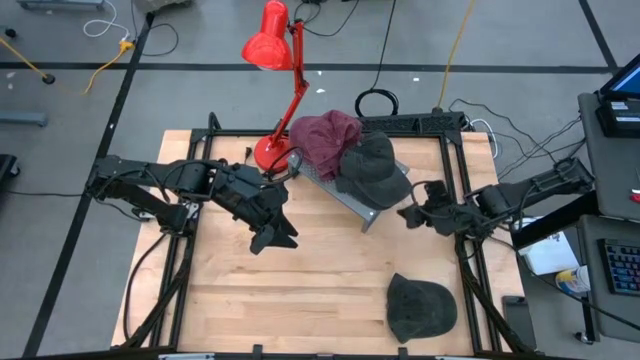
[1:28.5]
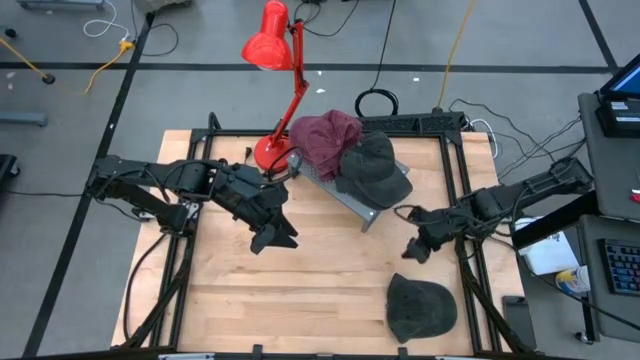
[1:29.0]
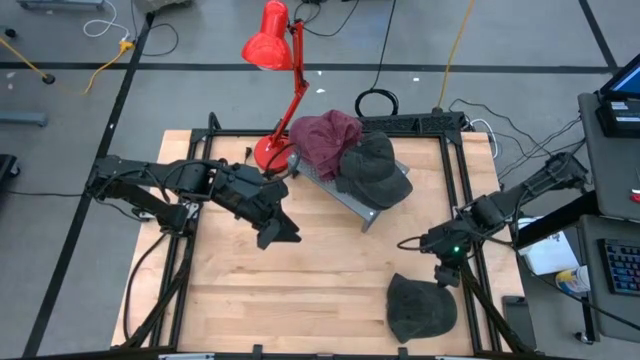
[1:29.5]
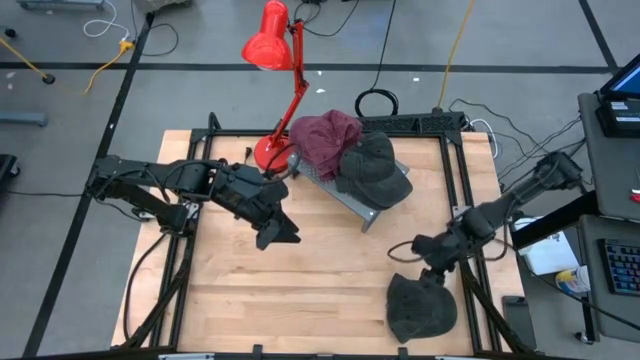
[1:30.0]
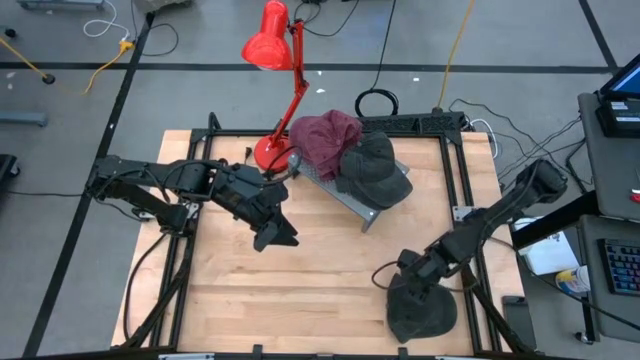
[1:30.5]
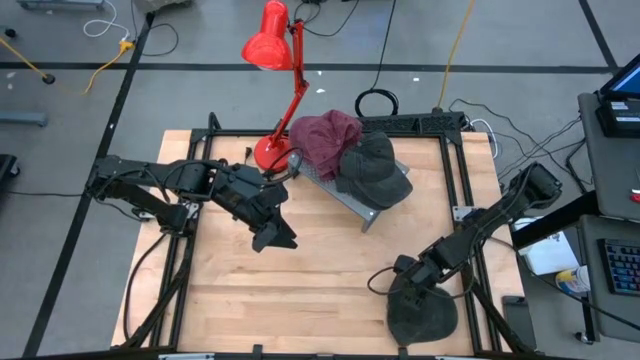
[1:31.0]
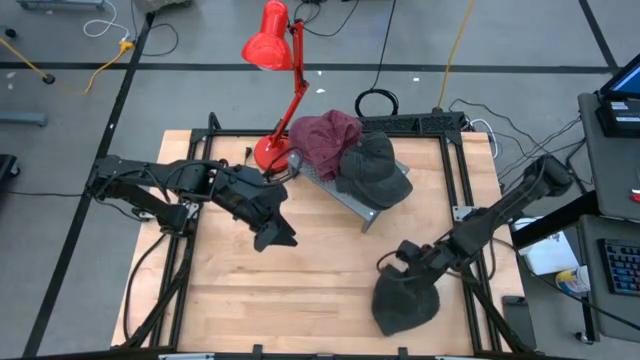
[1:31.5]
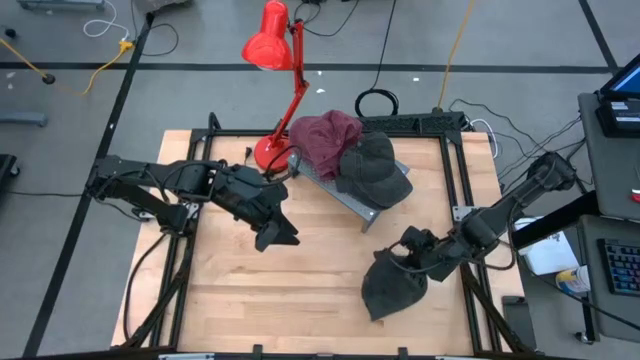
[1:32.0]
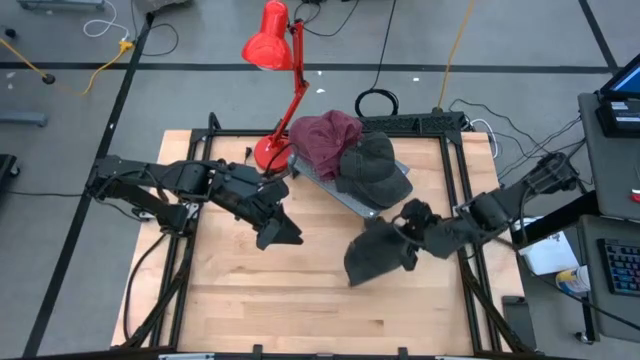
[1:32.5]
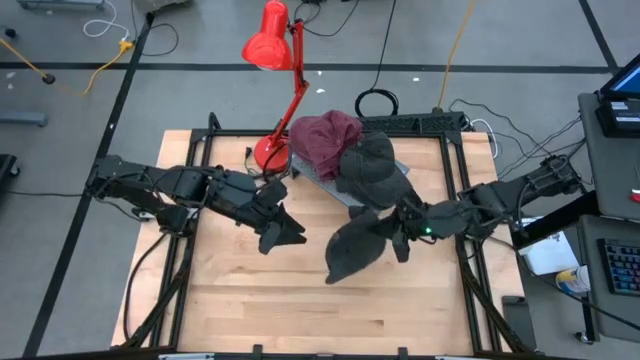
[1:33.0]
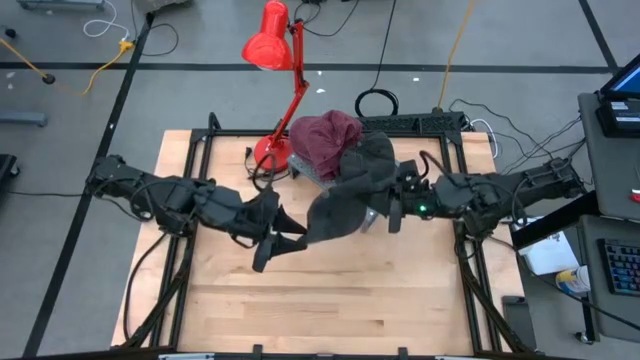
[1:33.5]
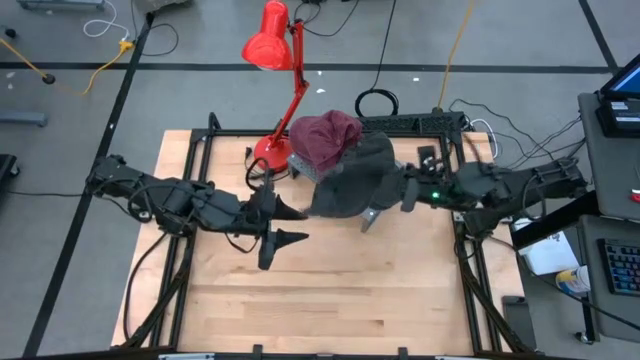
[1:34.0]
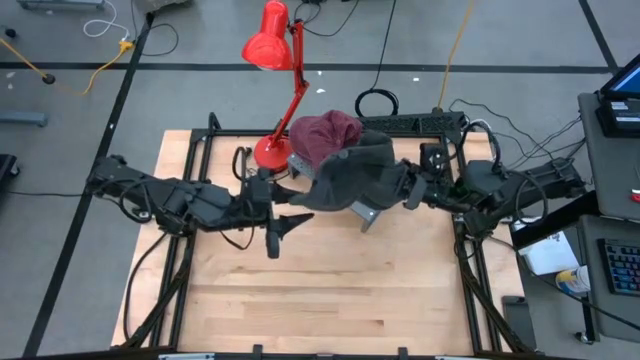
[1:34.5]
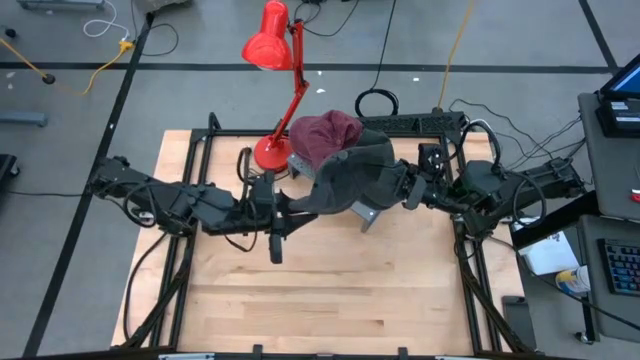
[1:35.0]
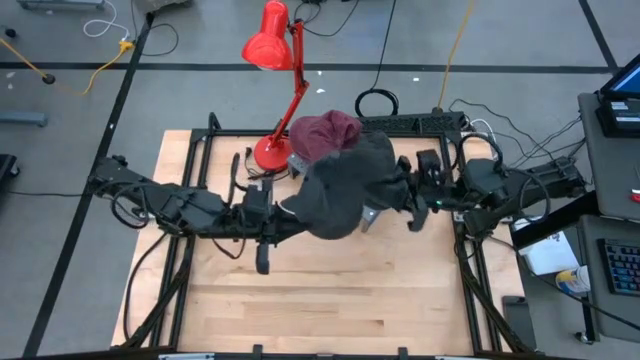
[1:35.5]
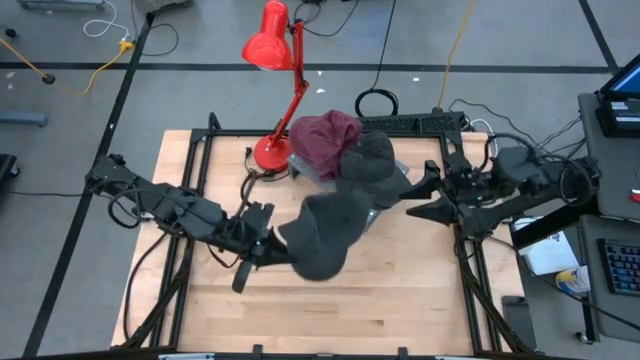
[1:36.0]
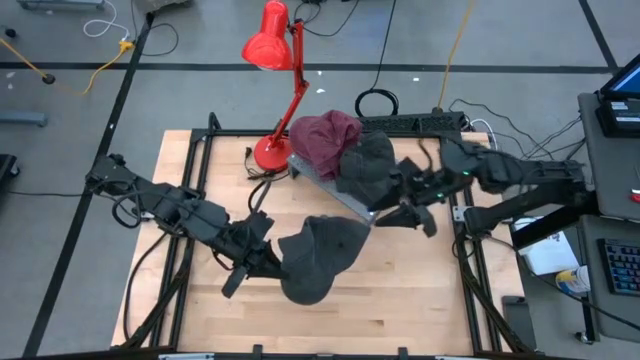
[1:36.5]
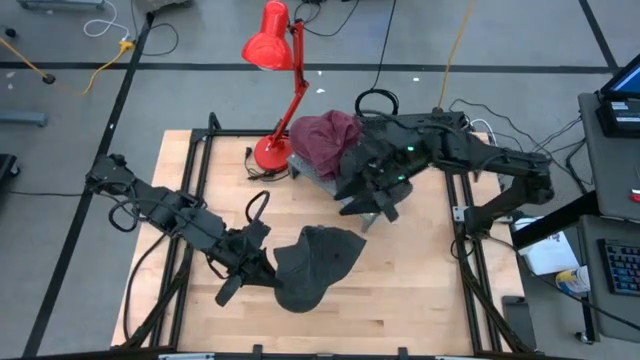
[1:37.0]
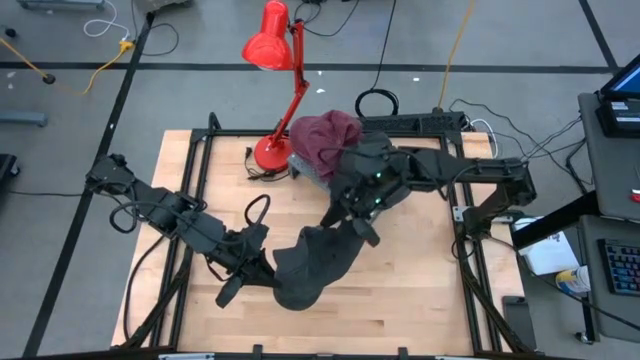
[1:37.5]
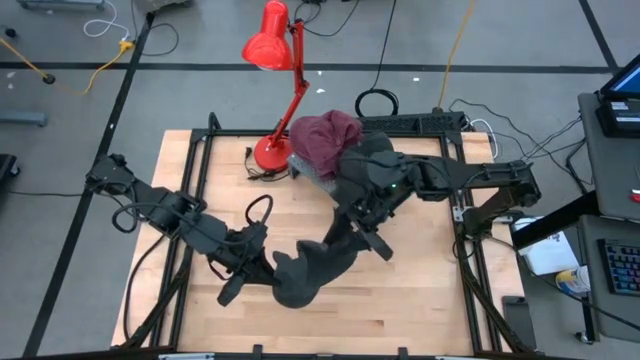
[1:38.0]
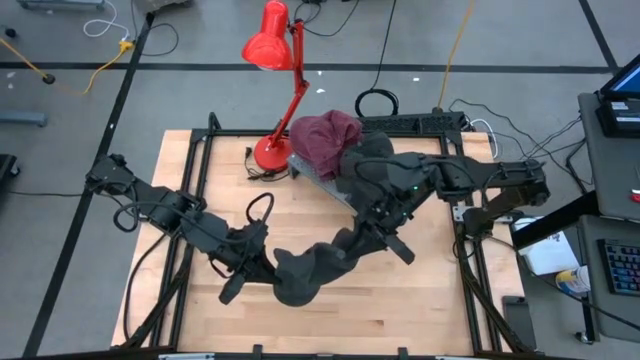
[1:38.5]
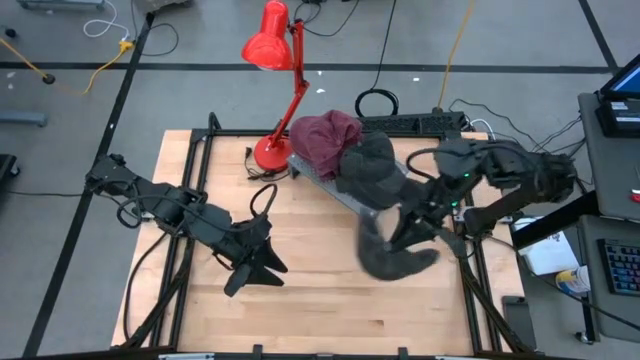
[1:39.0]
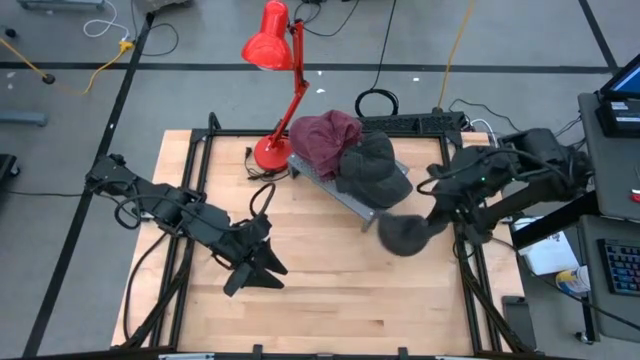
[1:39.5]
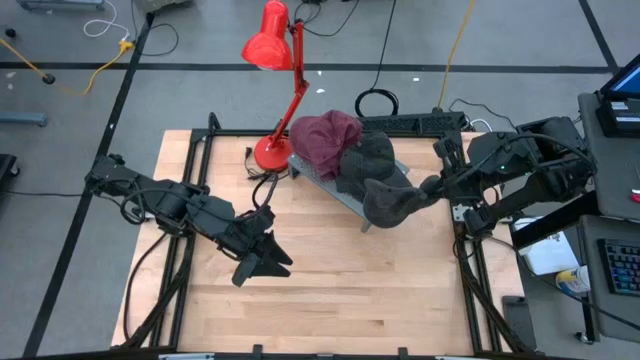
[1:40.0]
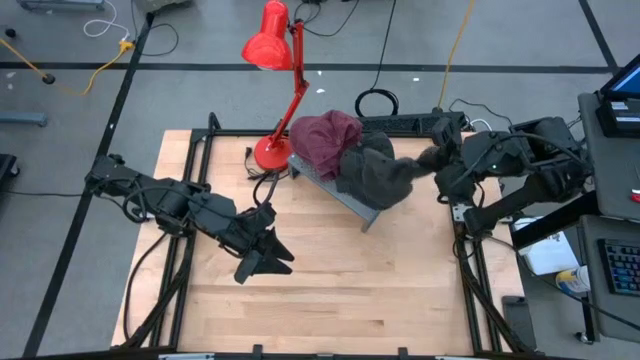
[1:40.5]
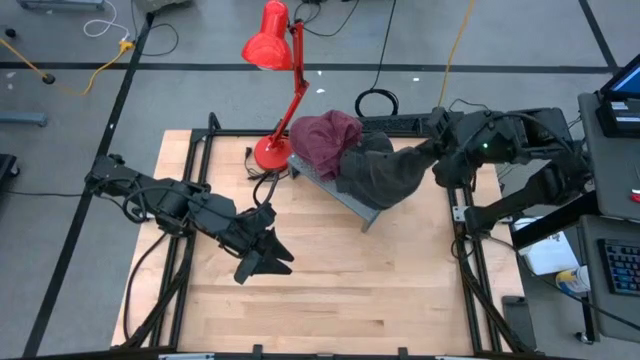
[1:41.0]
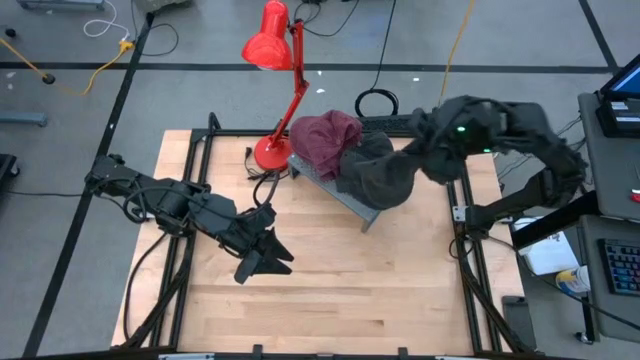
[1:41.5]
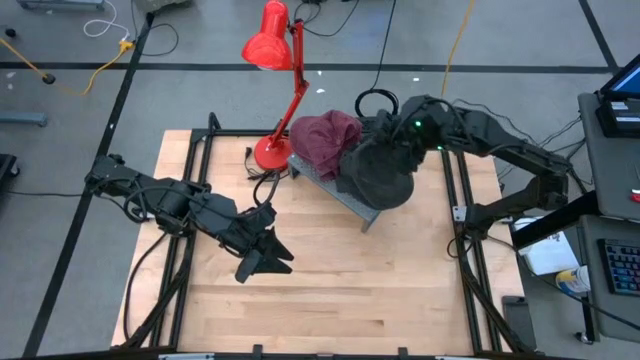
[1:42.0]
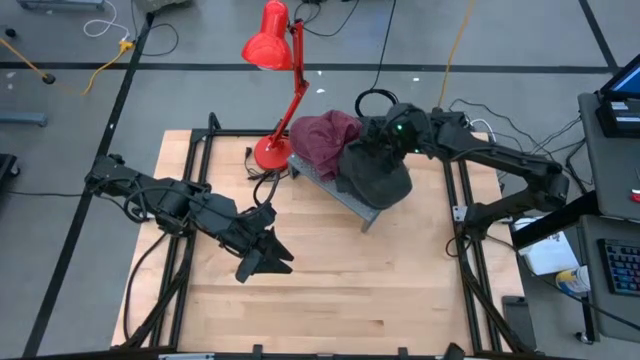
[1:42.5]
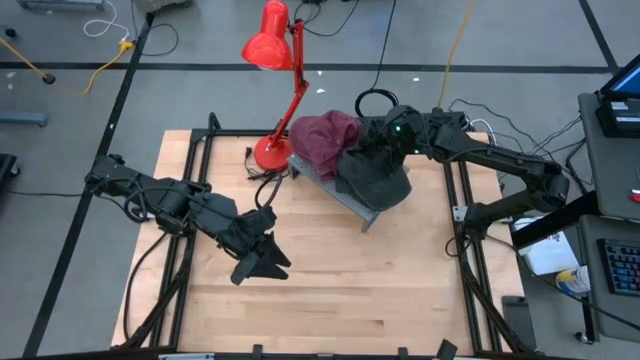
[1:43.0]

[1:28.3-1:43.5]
Task: Pick & Place hat
Stack the black cap on top of the black cap on the shelf

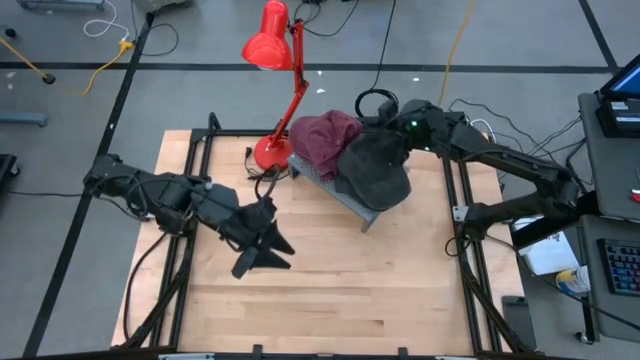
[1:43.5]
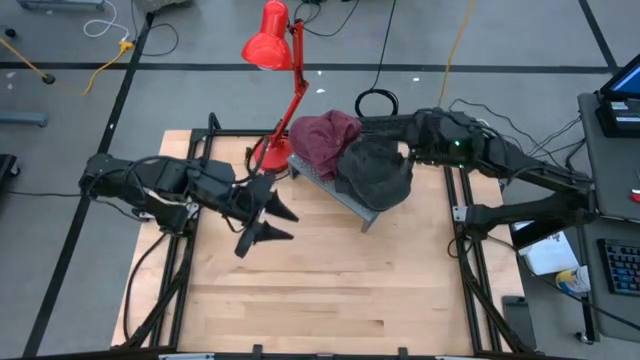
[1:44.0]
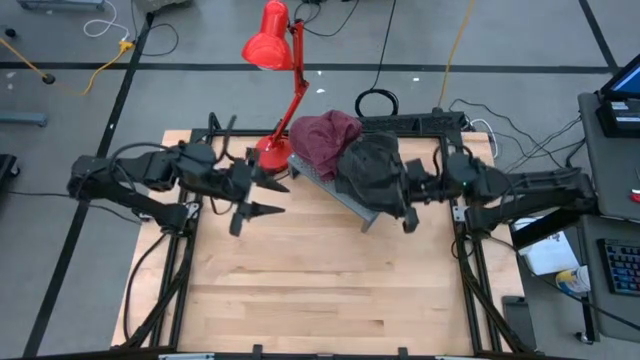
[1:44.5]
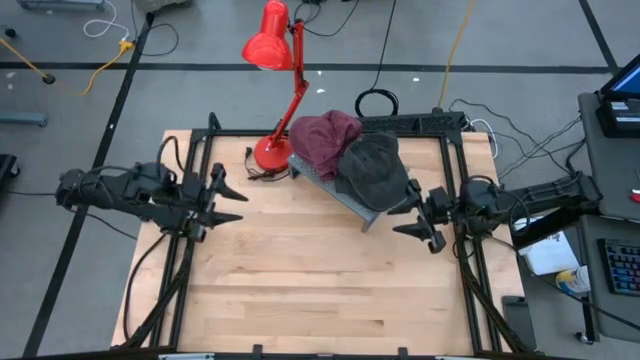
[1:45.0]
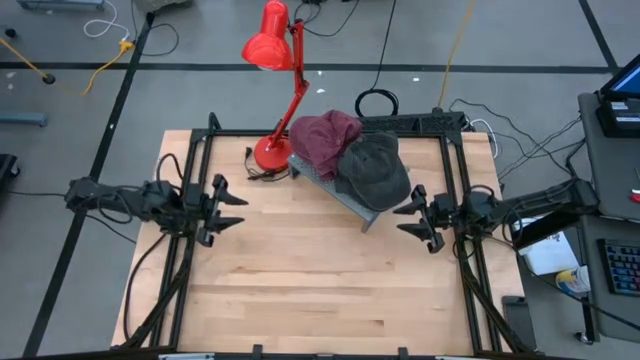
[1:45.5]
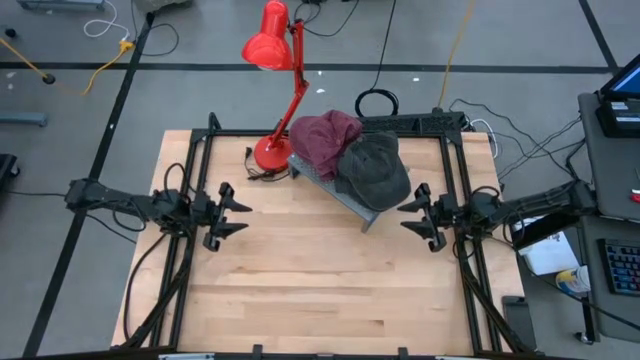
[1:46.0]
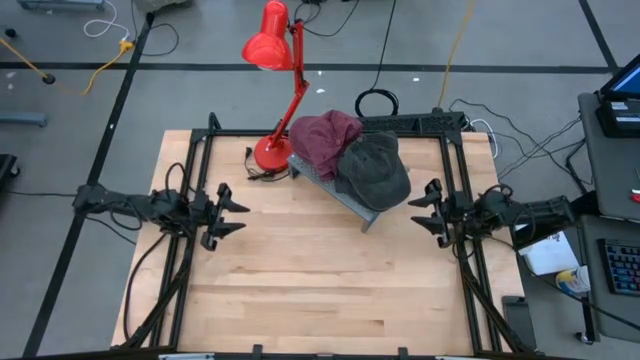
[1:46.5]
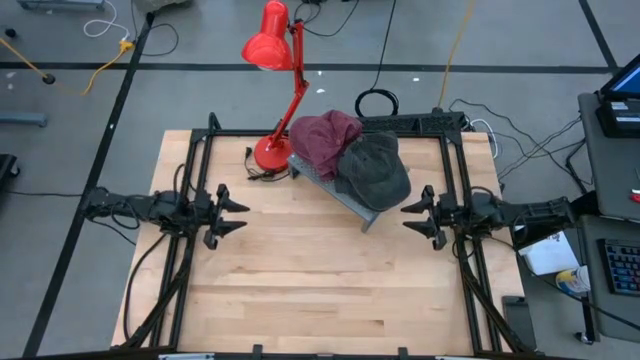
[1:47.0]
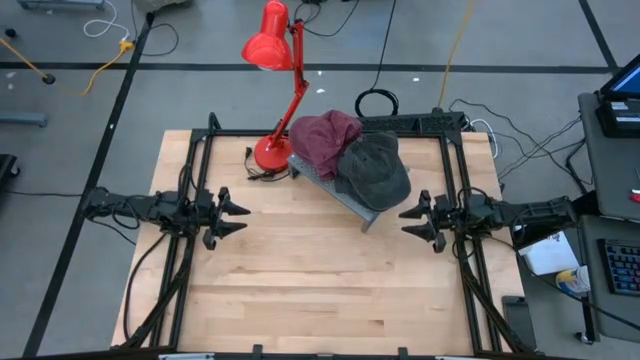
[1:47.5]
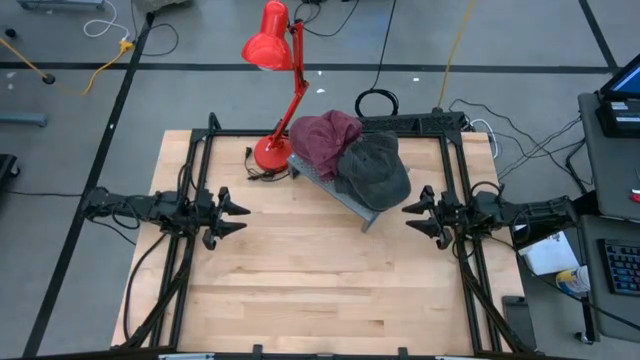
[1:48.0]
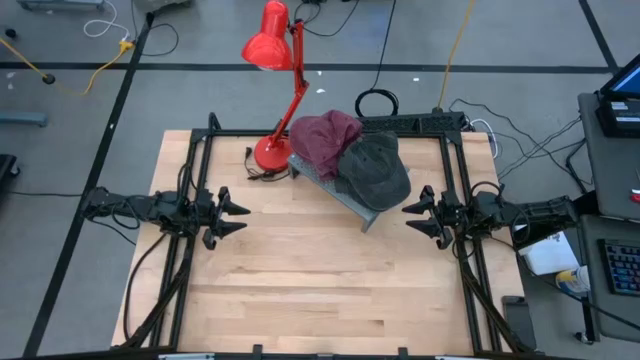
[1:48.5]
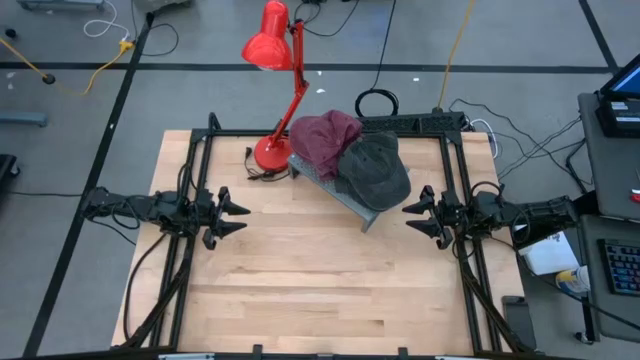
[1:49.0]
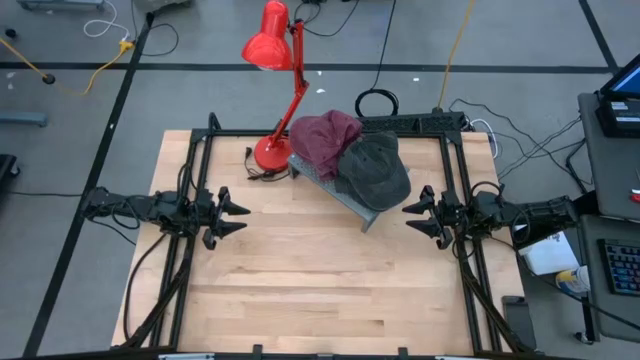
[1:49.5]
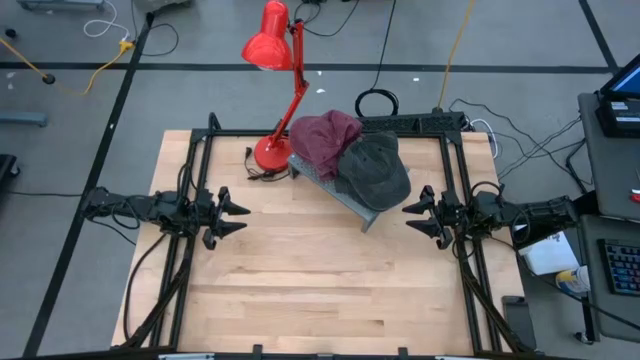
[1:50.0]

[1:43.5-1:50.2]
Return to Home Position
